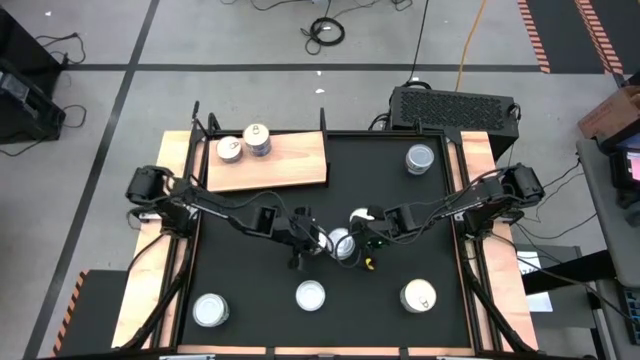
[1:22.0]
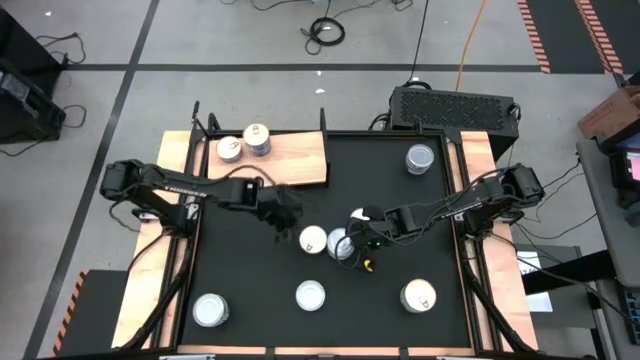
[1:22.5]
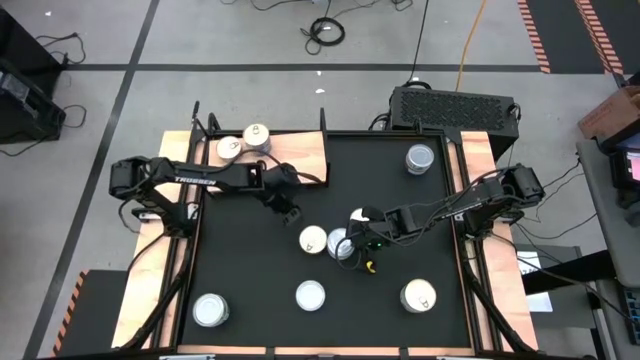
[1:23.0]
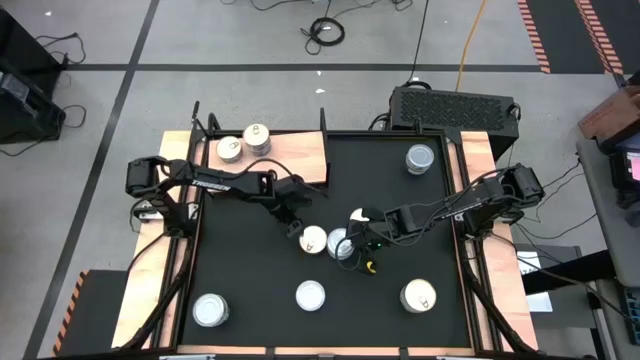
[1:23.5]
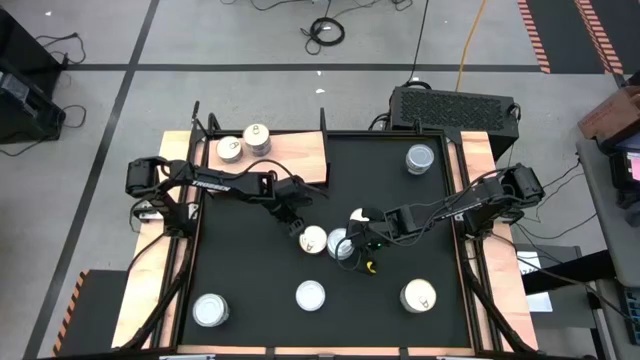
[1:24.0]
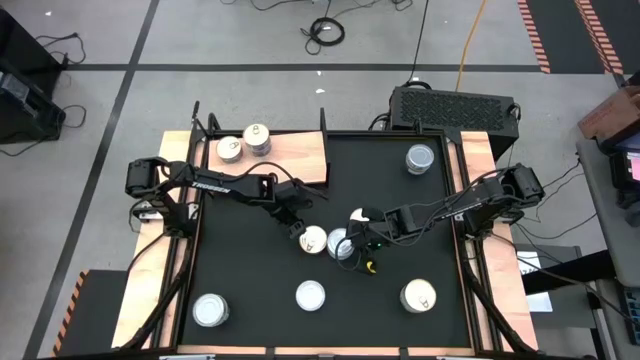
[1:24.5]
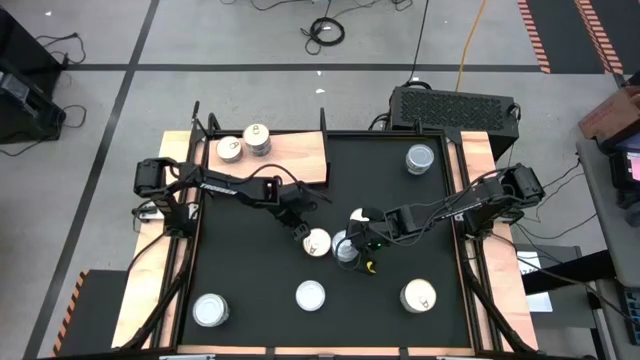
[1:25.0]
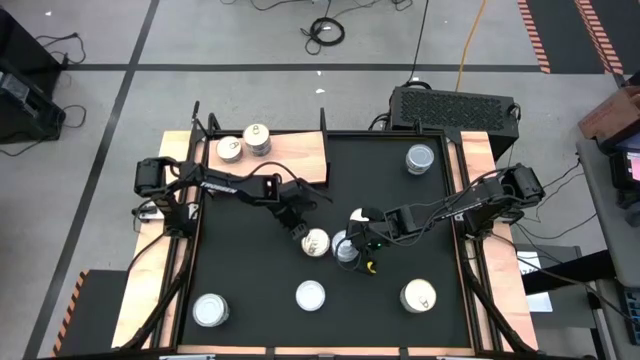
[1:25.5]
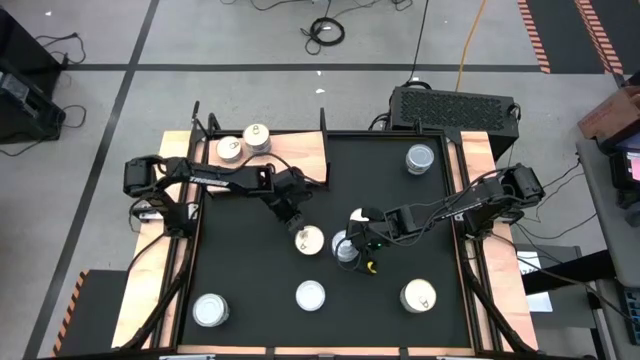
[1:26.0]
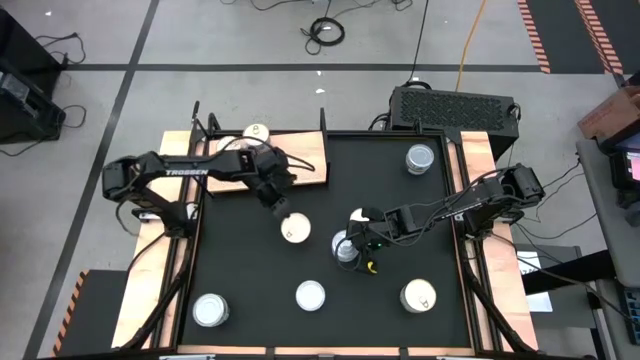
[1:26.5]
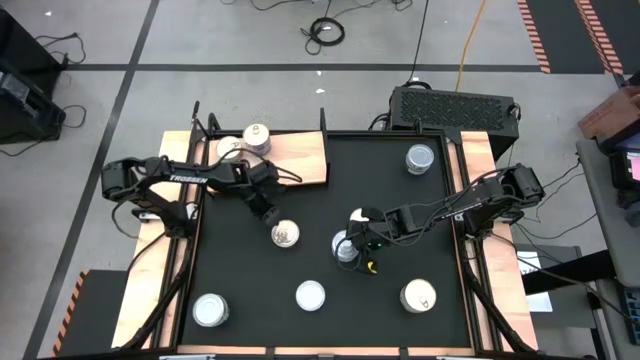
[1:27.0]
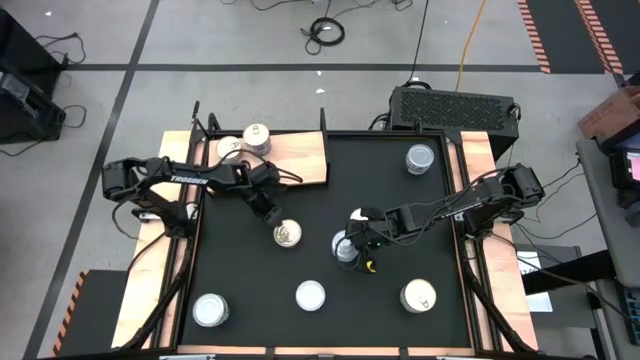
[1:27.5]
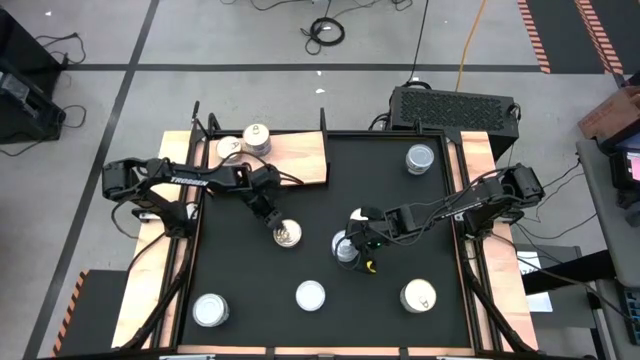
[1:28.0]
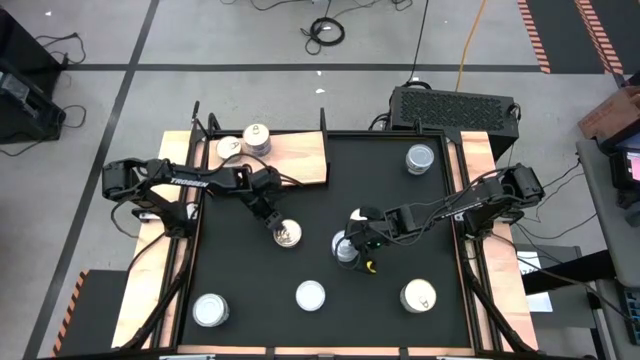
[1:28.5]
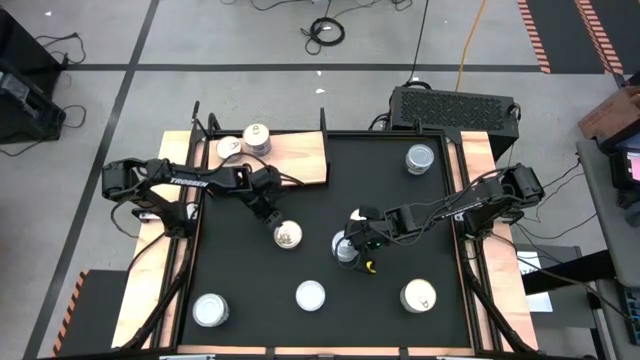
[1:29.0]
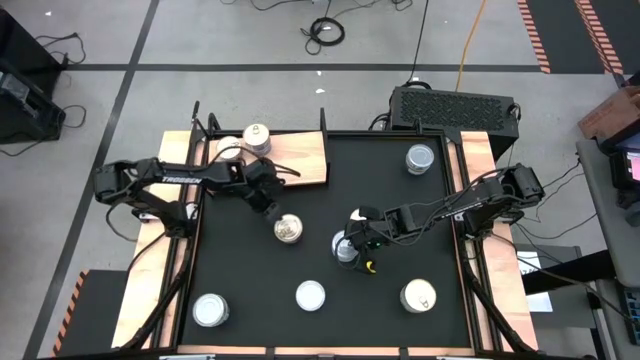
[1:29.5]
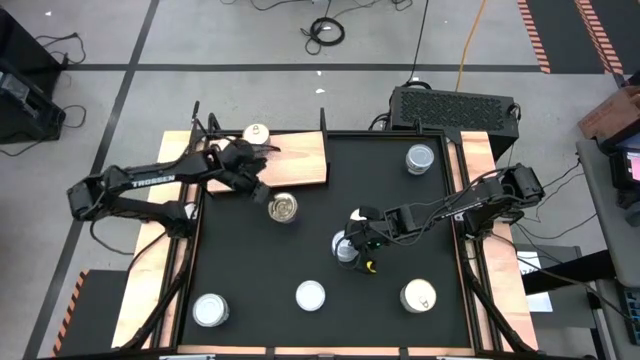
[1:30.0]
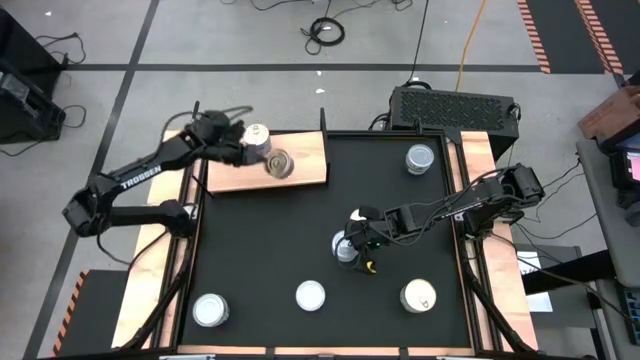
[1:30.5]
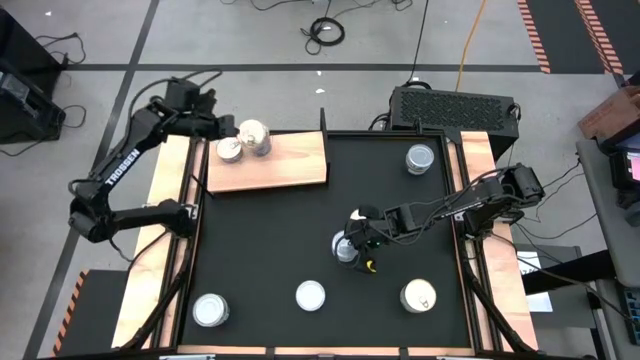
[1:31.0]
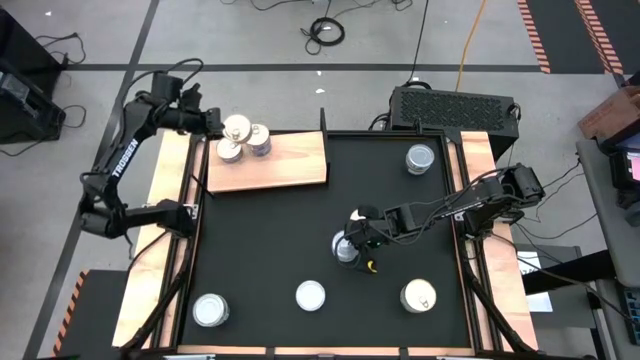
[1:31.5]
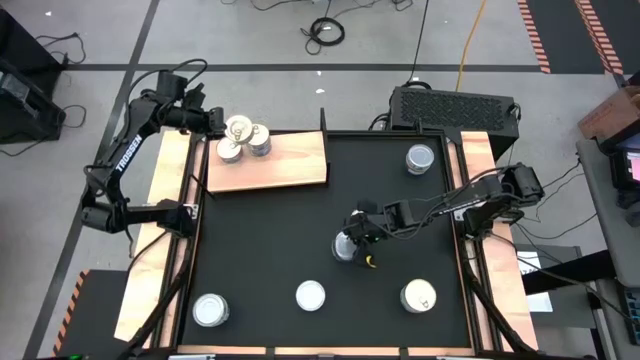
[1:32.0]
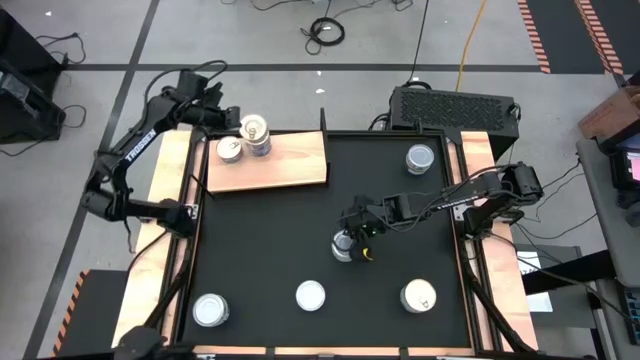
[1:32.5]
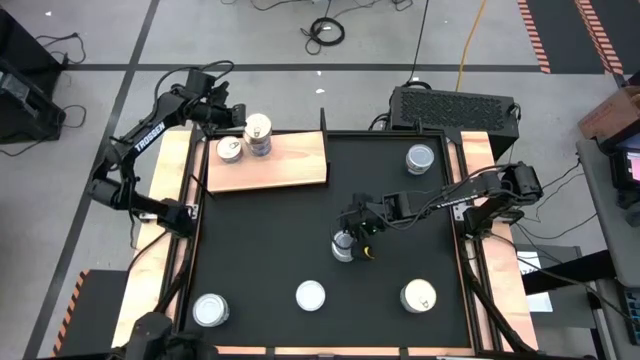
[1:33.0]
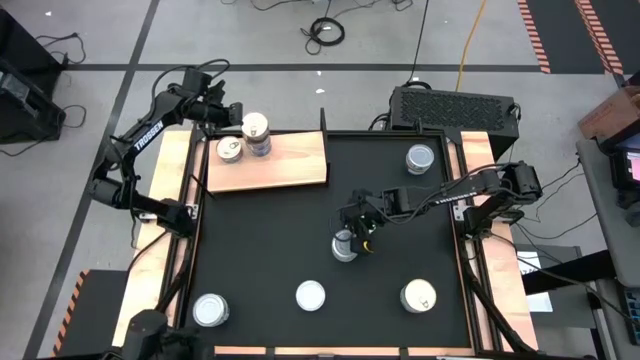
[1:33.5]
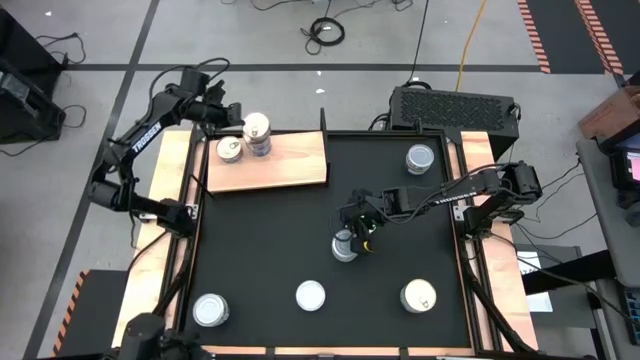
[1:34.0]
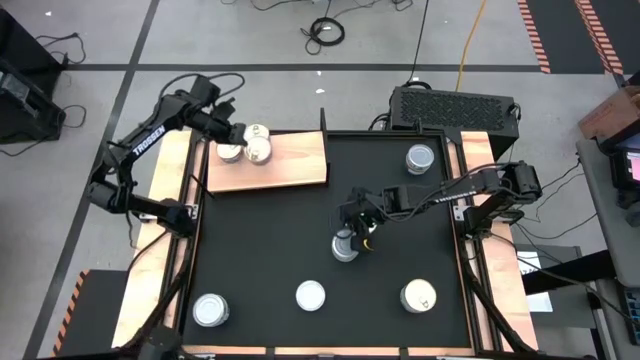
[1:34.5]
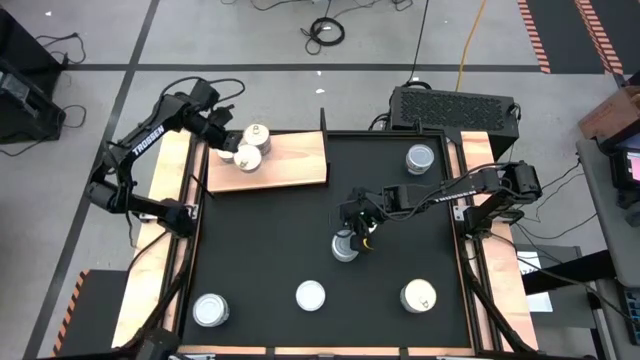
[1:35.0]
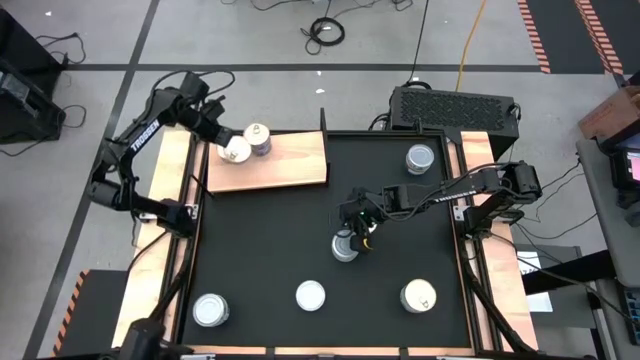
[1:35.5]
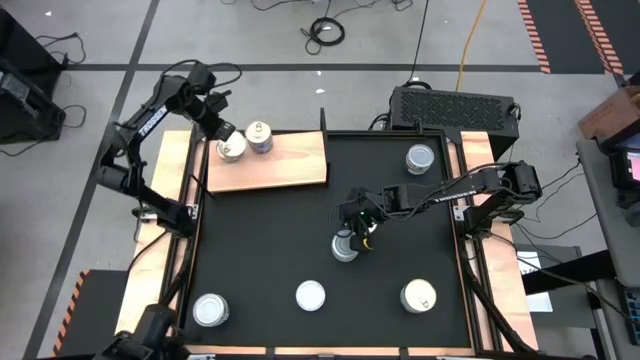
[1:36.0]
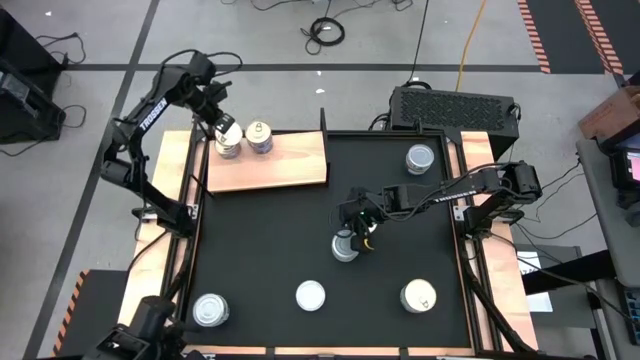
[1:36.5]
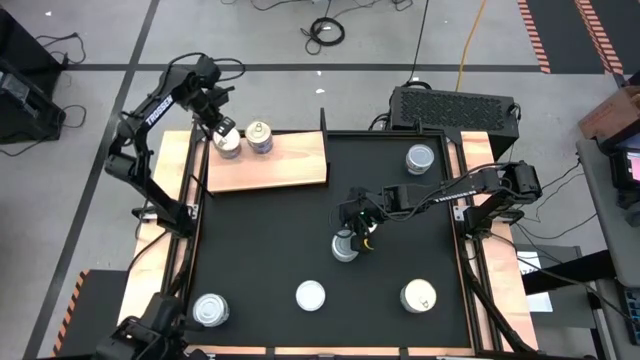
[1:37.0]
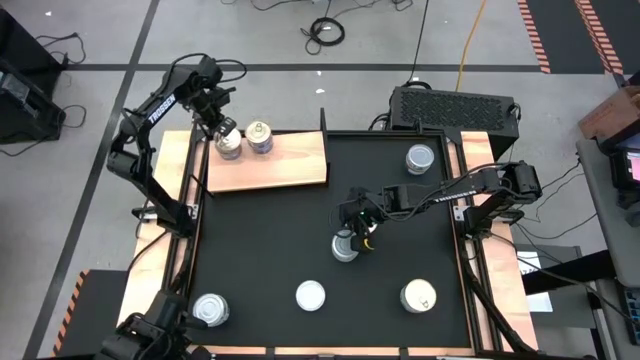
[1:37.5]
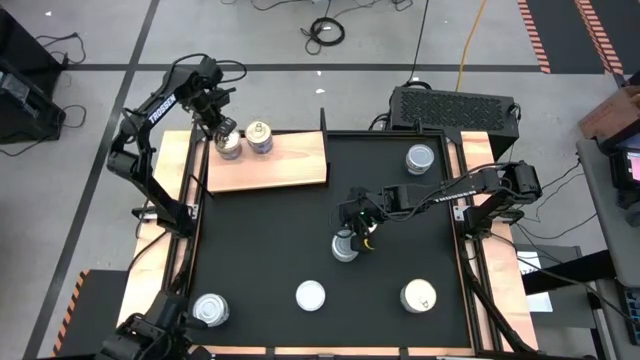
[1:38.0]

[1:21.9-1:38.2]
Task: Stack canned seafood by type on shelf
Stack the blue and pink tuna can on top of the left blue and pink tuna can on the shelf

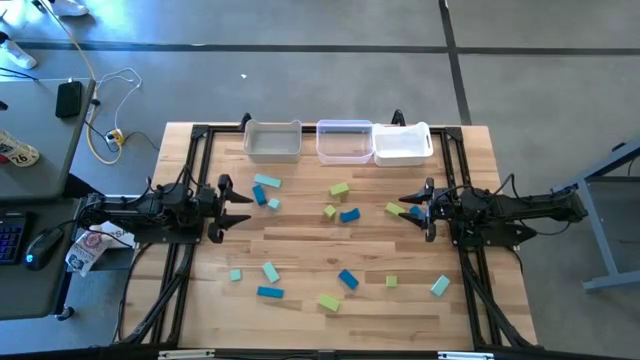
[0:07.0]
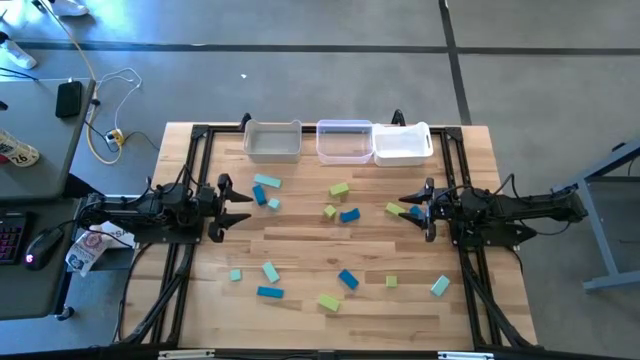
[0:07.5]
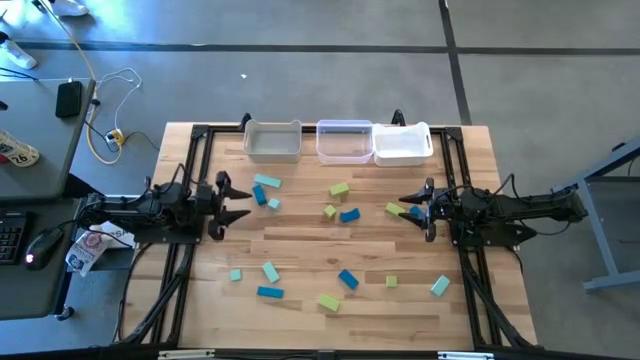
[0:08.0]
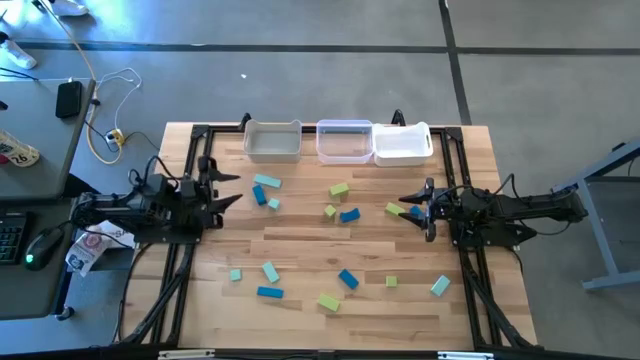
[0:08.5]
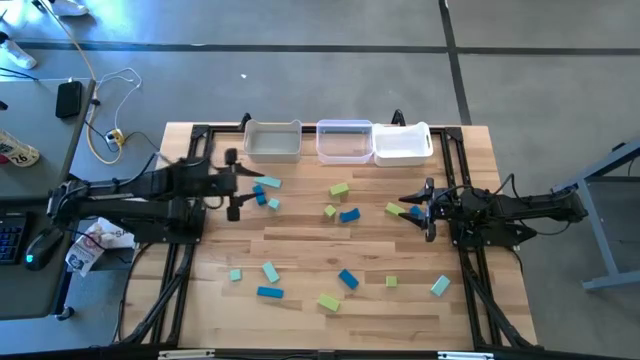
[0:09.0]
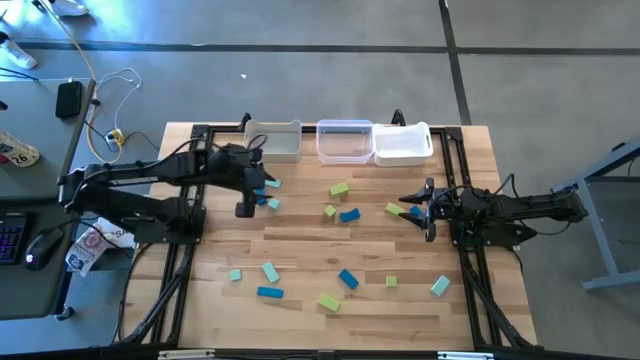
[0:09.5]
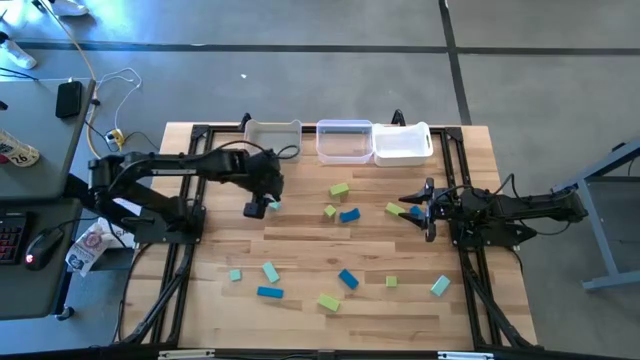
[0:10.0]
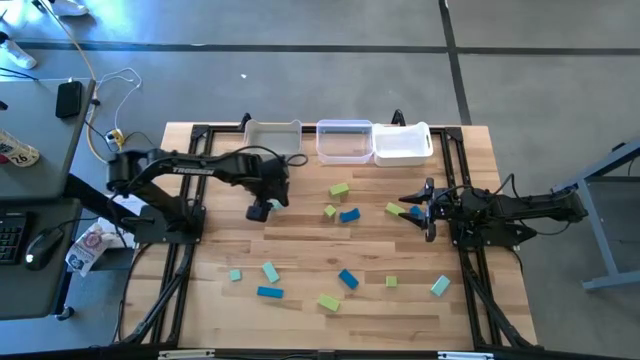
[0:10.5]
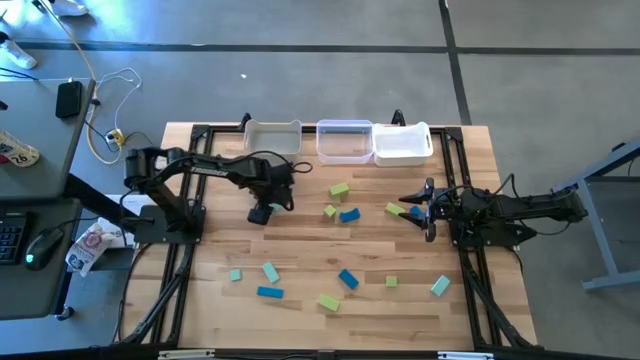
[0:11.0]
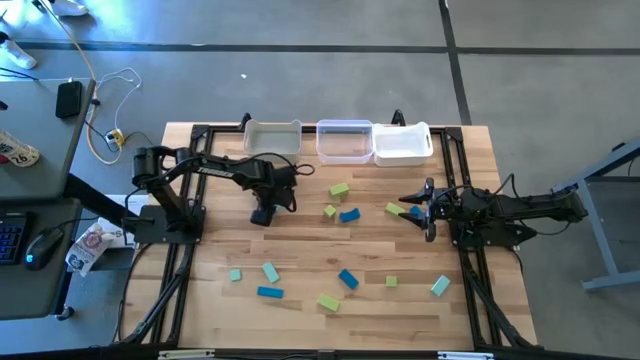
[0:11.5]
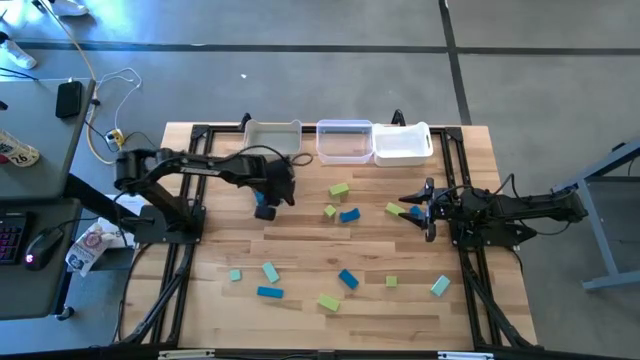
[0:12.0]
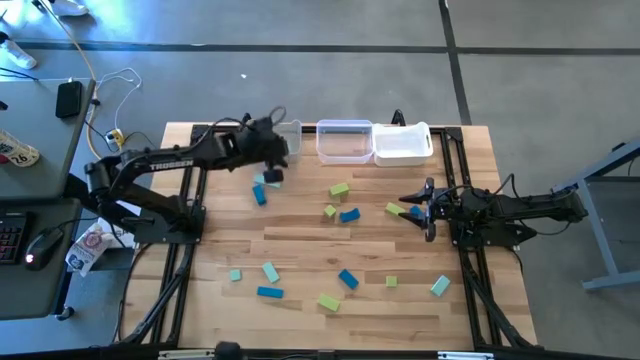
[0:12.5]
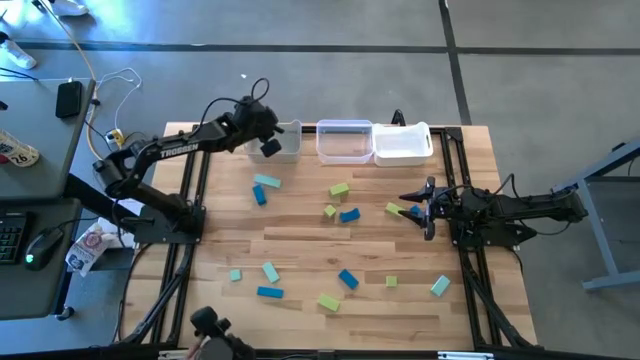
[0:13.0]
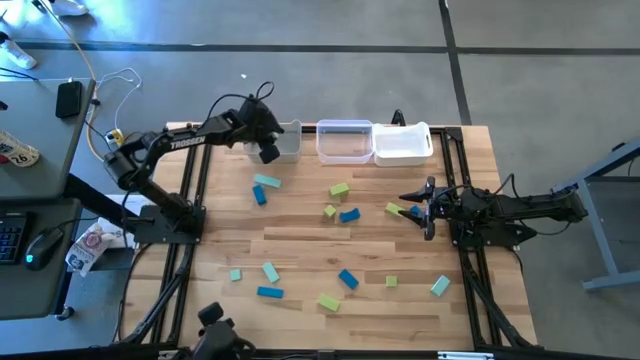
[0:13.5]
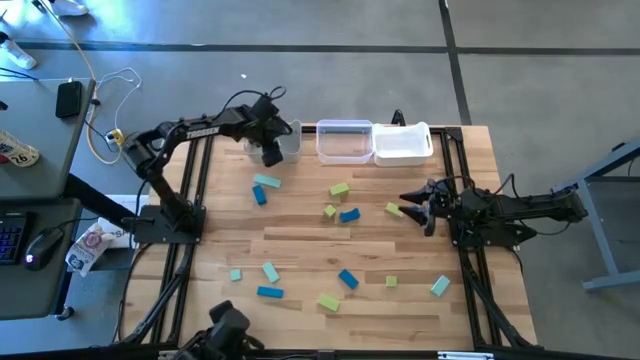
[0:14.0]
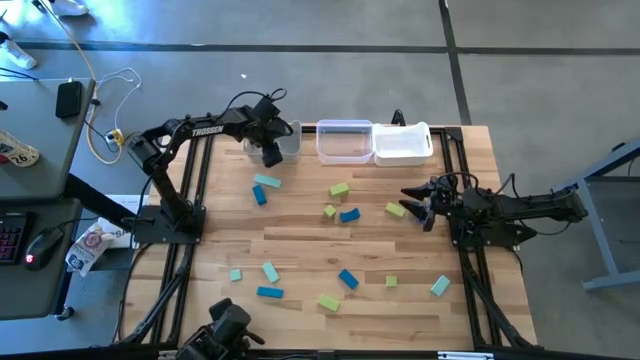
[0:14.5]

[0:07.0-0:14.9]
Task: Sort & place blocks by color
Put the light blue block into the gray bin
